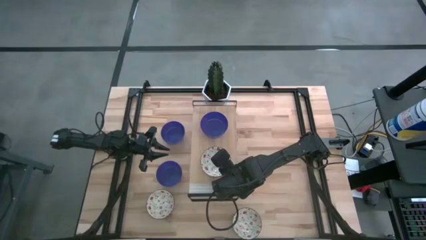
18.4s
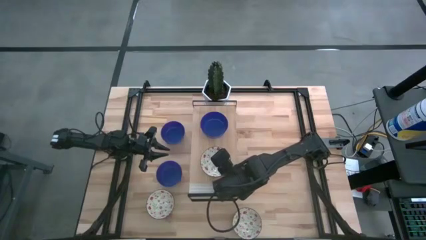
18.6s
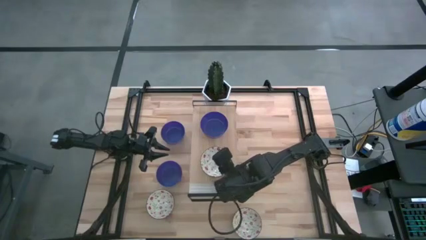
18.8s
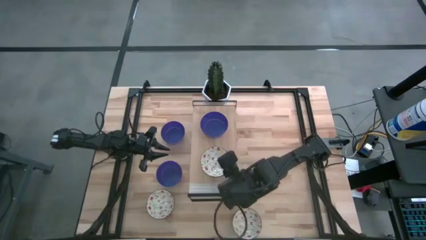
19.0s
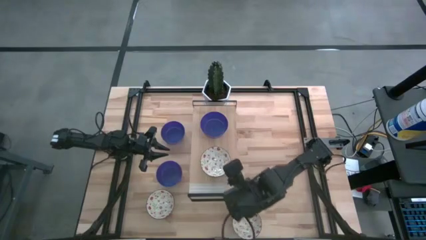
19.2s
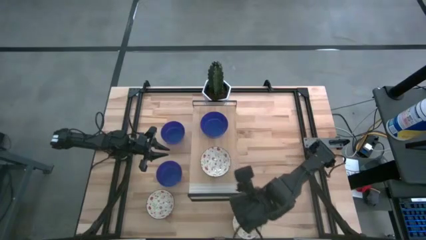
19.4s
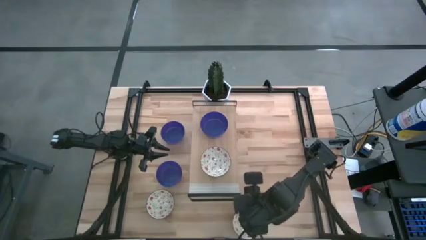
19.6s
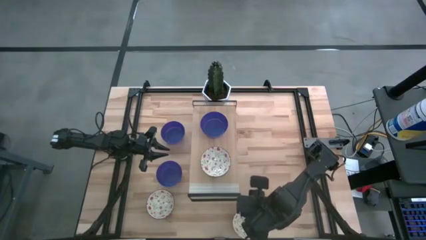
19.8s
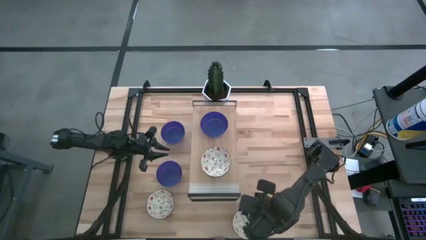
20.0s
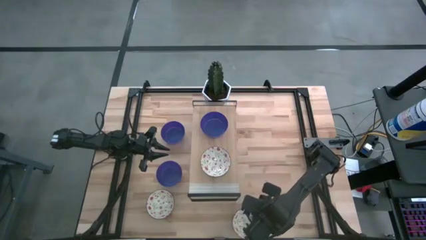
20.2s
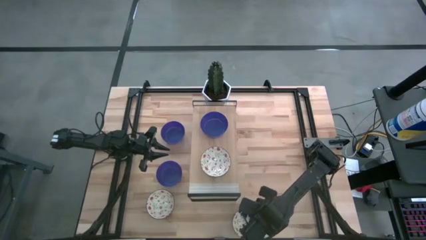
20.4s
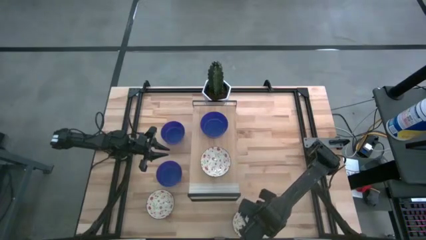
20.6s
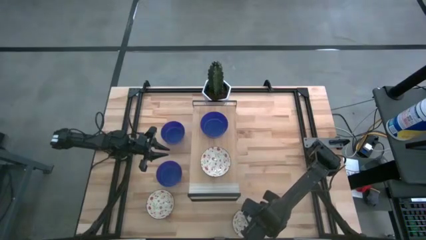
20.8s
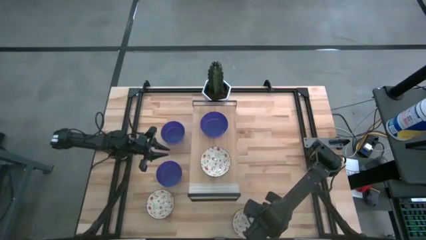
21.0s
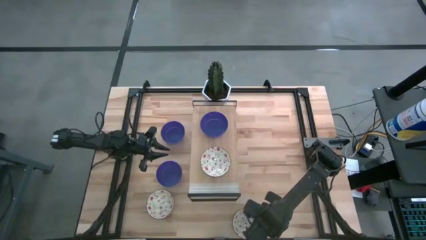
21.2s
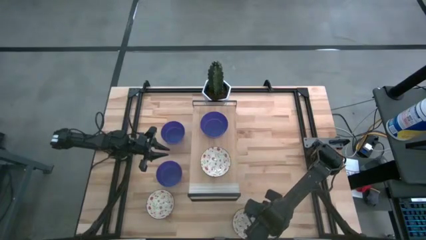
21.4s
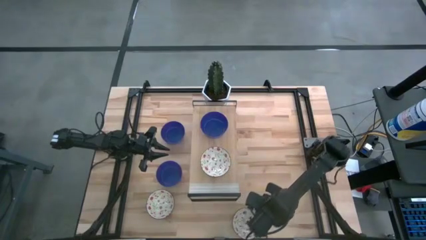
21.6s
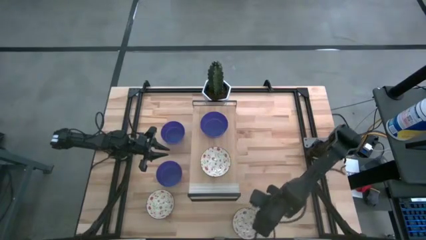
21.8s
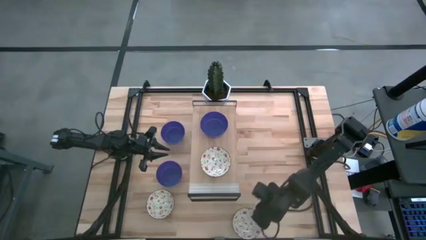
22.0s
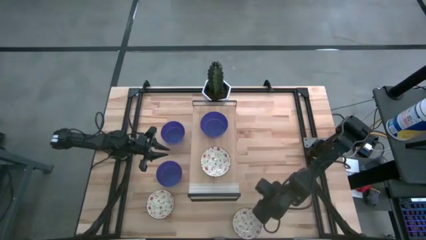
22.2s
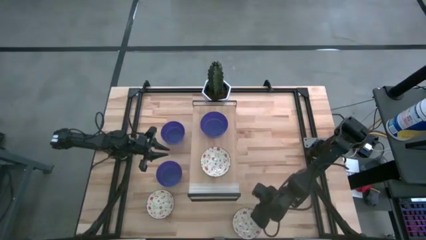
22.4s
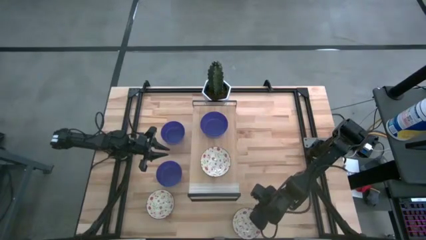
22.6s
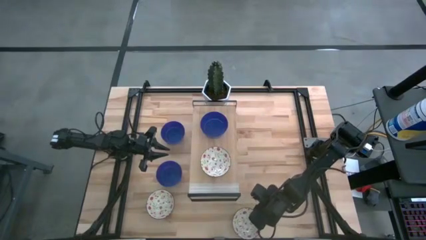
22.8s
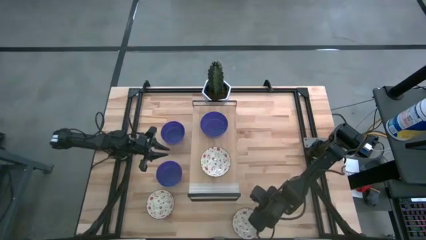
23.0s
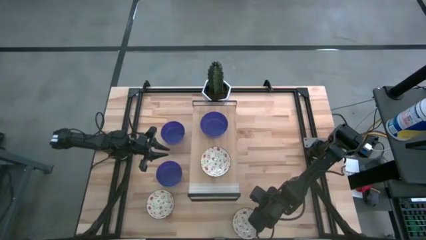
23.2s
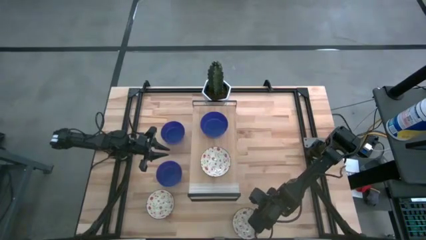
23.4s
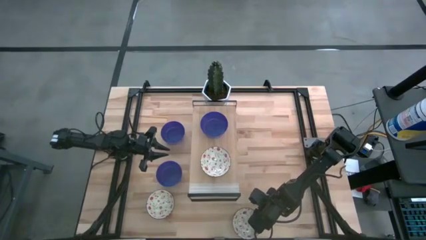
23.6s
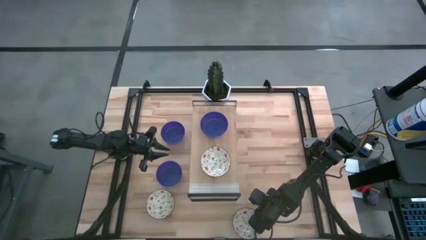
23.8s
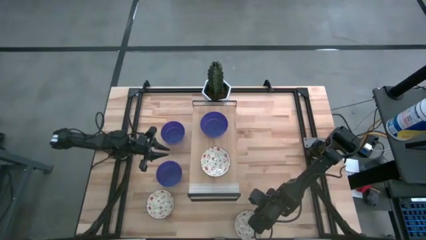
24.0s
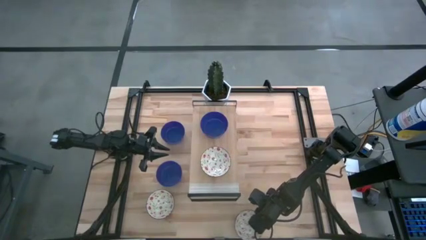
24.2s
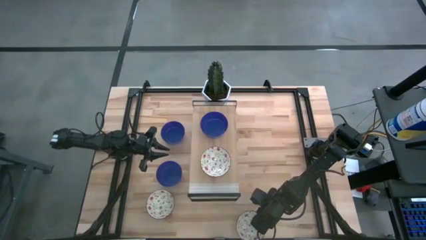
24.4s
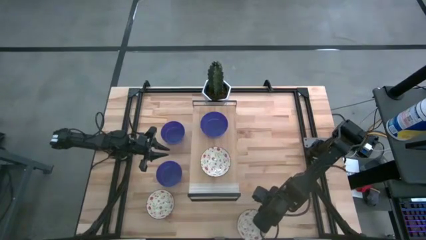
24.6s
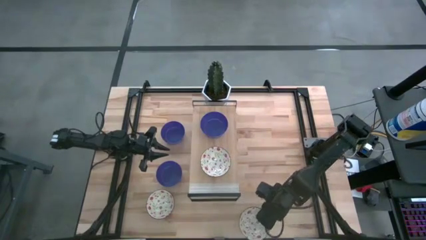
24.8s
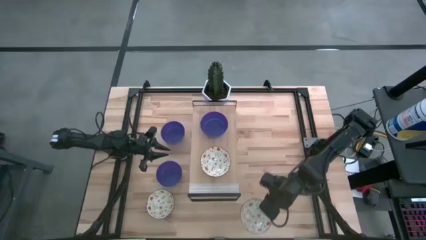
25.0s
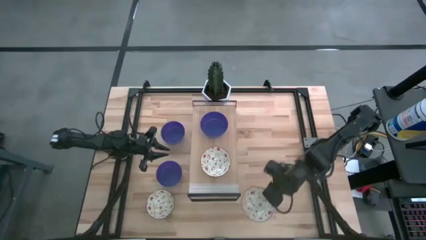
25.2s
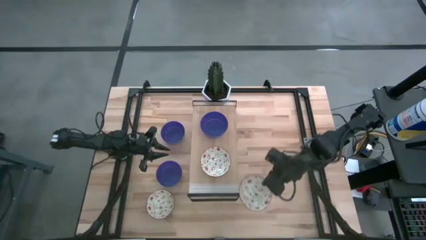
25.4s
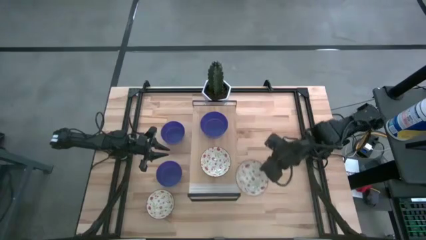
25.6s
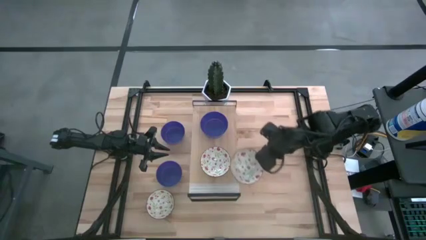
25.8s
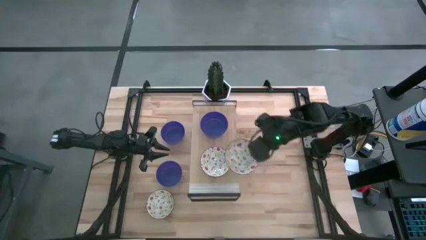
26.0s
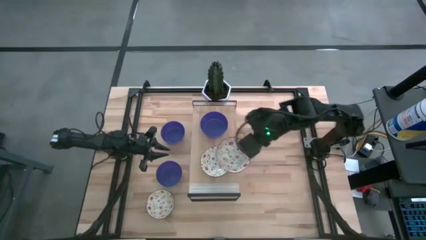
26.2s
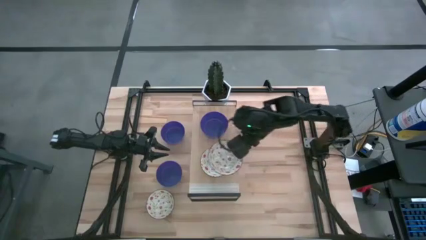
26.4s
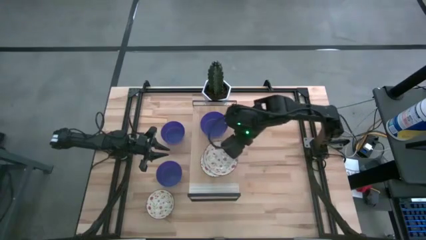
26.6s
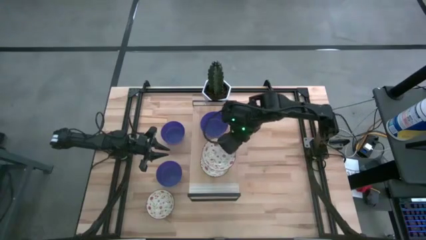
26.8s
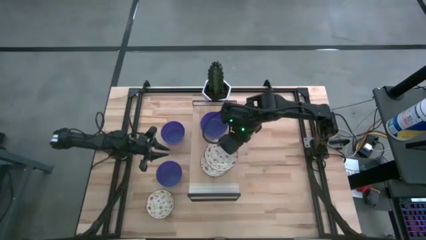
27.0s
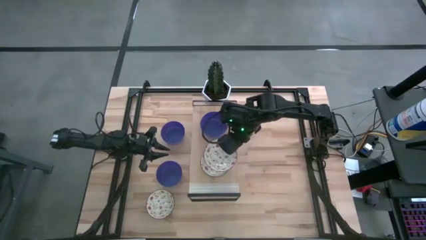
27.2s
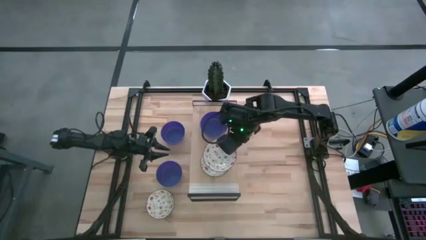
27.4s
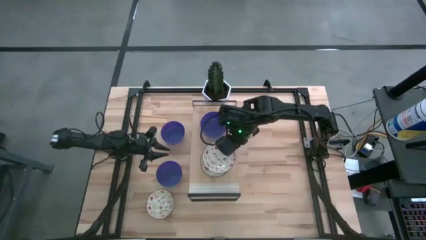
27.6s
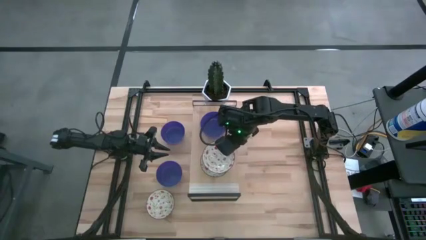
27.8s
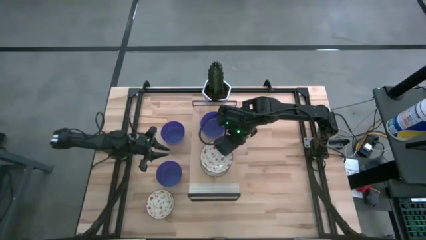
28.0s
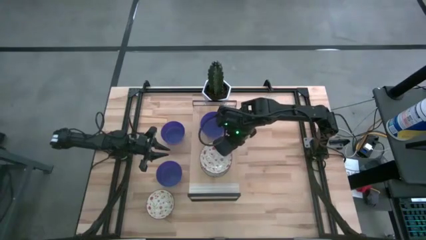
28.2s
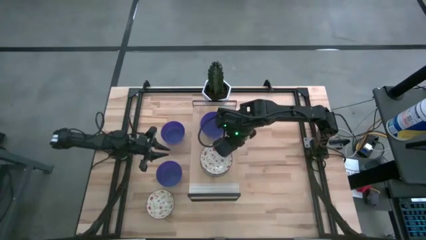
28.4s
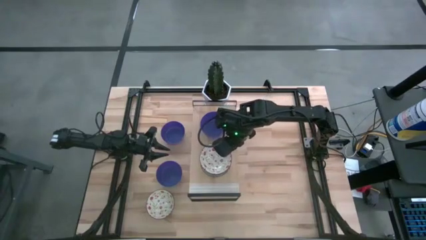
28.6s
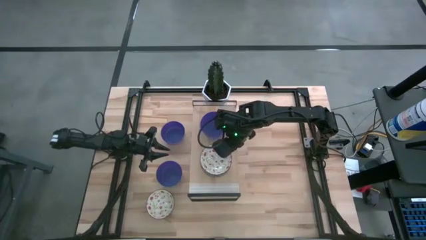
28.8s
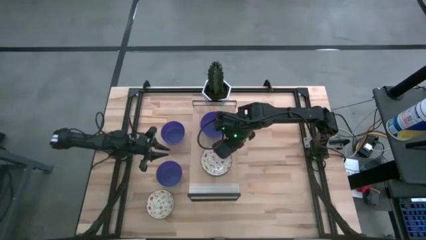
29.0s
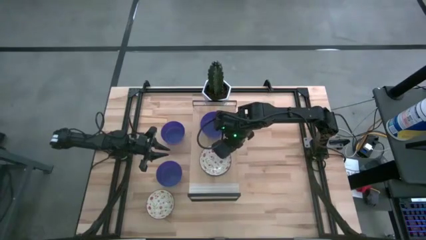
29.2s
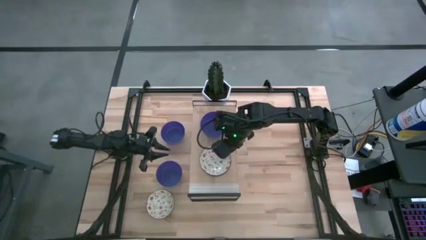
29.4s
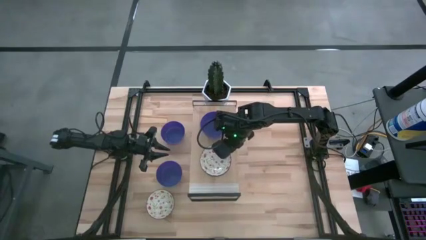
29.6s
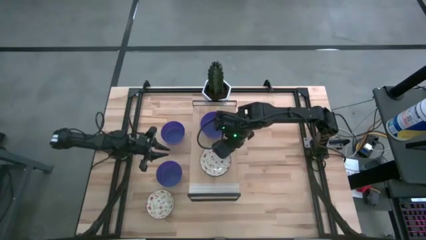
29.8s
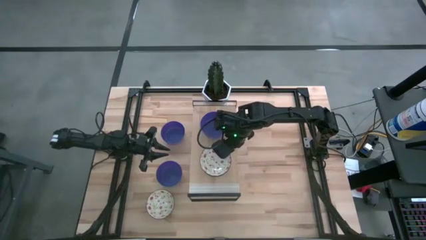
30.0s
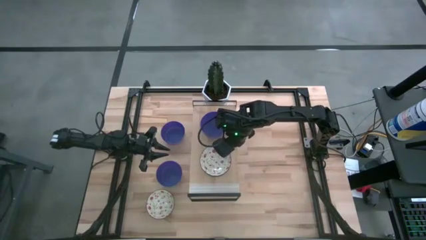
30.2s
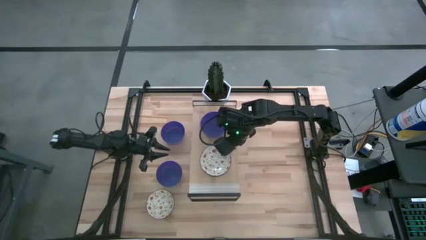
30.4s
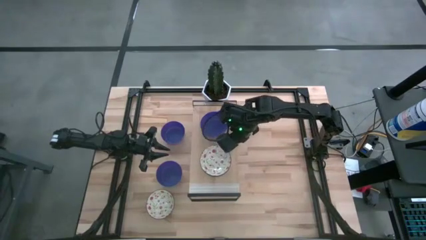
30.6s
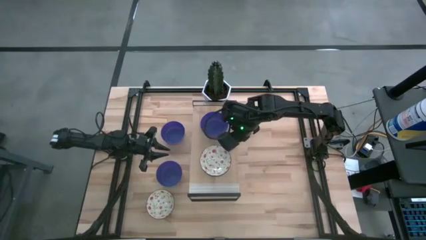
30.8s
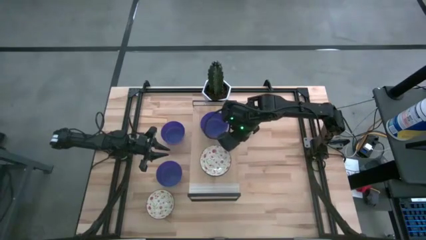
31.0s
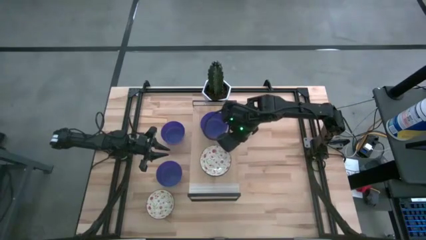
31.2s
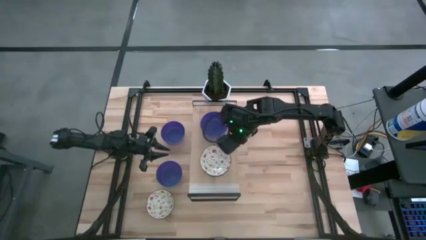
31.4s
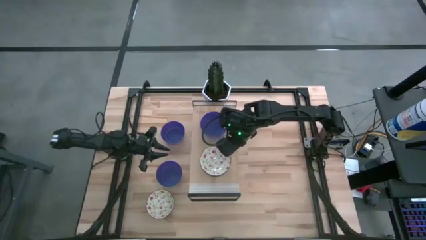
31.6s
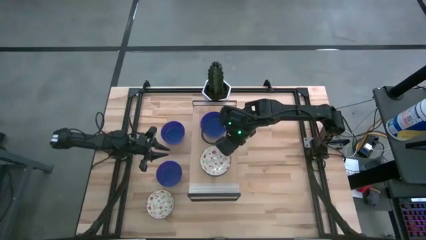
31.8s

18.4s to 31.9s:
Task: Pick & Place Mini bowls
Stack the right white patterned bowl on top of the white patterned bowl on the shelf

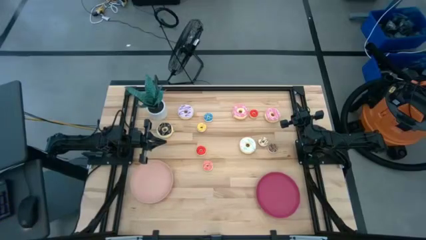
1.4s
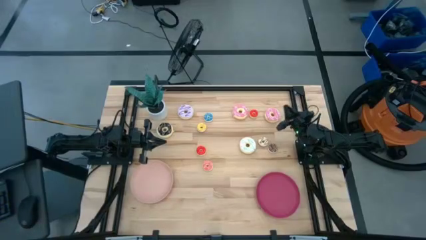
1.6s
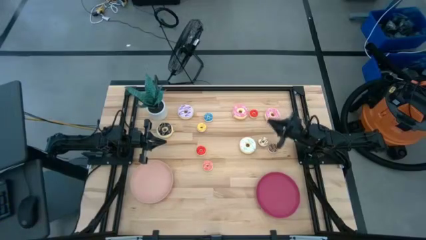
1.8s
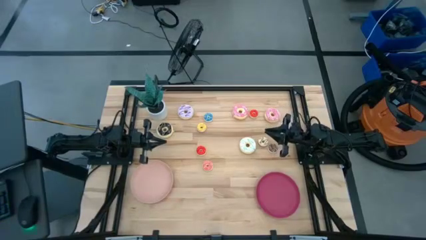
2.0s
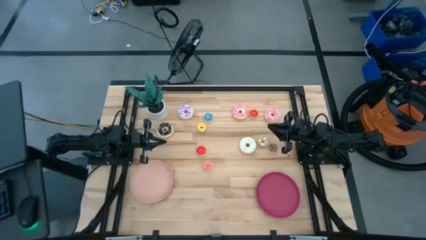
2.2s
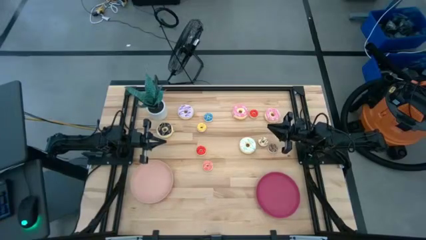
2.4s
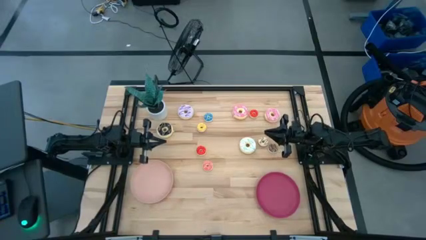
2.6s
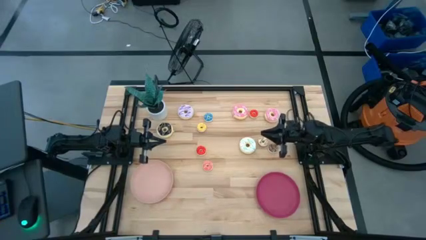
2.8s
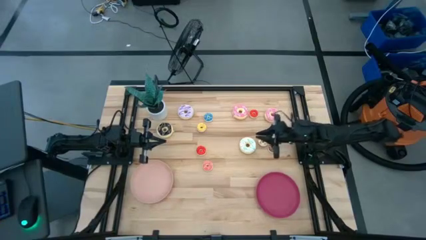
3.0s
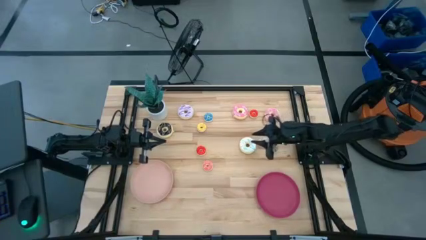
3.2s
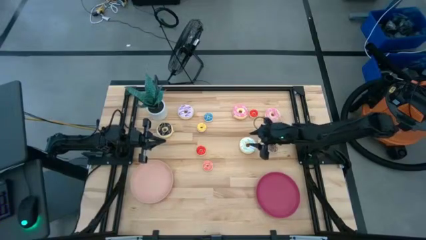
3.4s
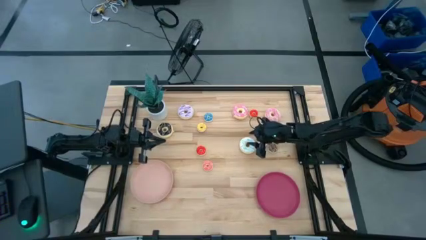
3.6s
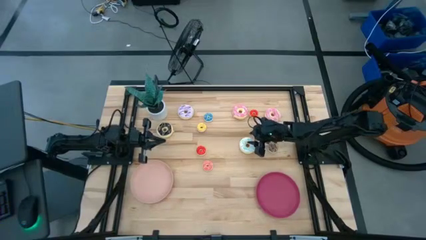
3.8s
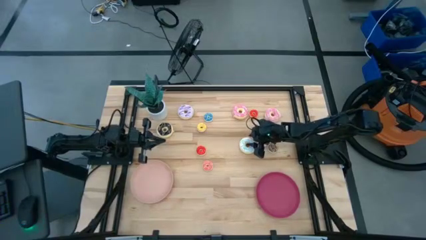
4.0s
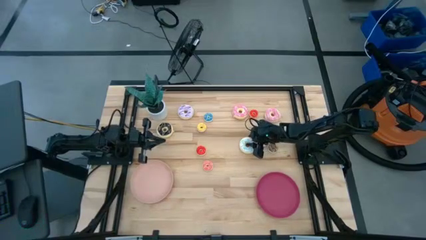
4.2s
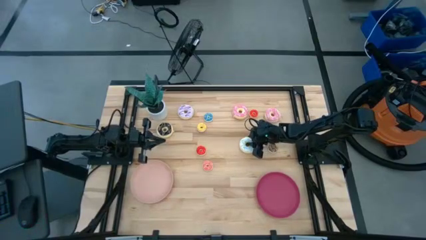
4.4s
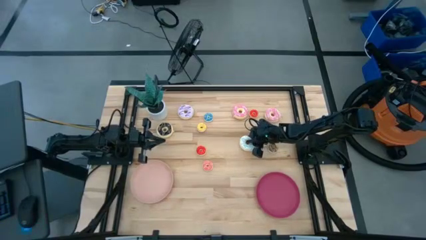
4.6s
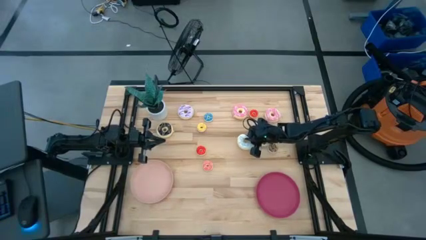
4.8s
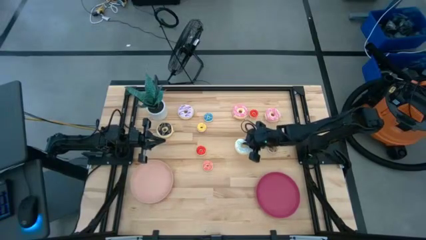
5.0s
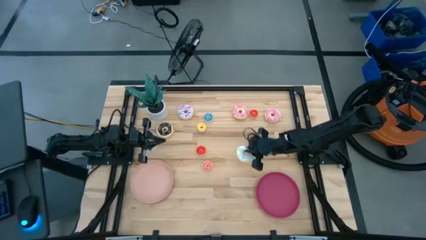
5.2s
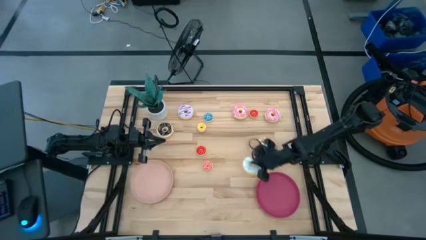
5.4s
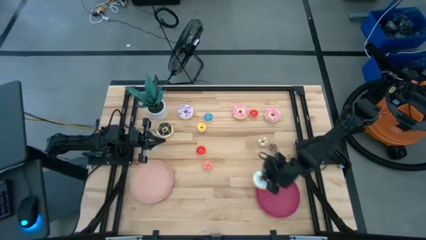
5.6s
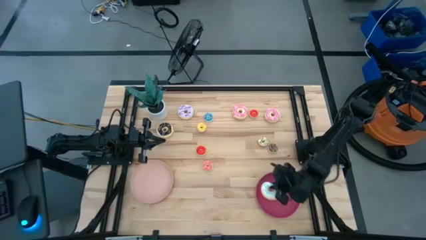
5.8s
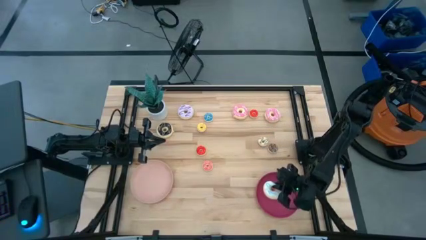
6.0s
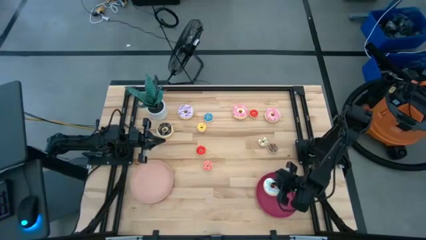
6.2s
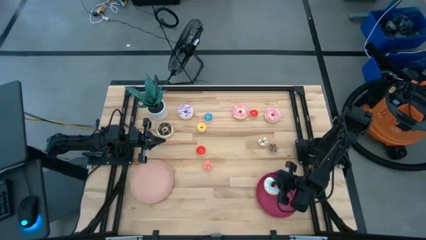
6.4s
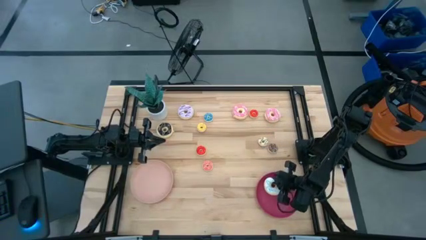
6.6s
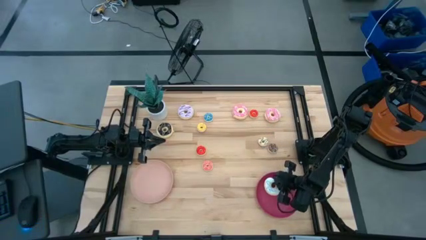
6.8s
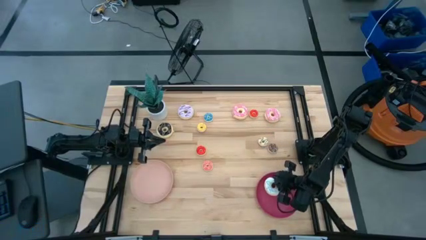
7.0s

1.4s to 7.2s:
Task: Pick & Place donuts
Put the big white donut on the dark pink plate
